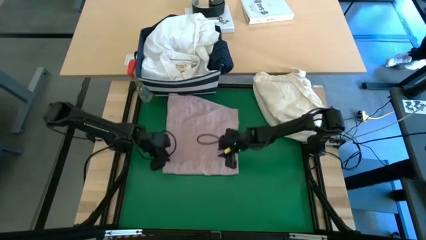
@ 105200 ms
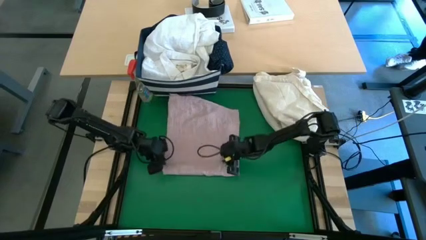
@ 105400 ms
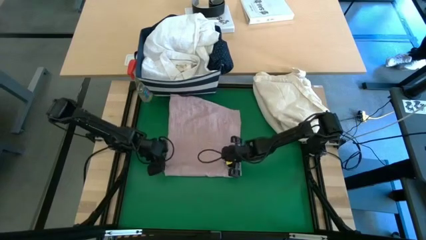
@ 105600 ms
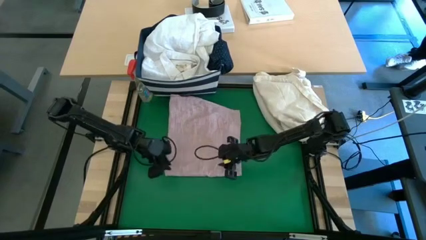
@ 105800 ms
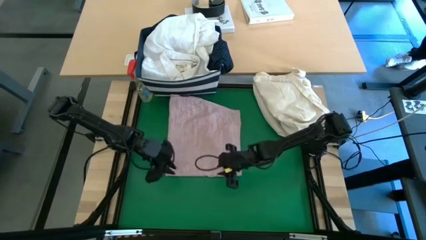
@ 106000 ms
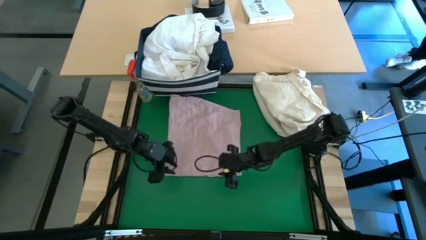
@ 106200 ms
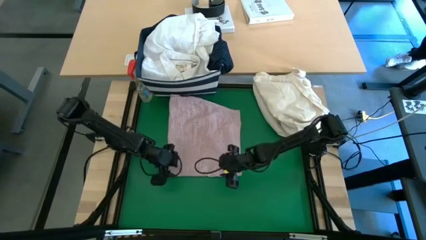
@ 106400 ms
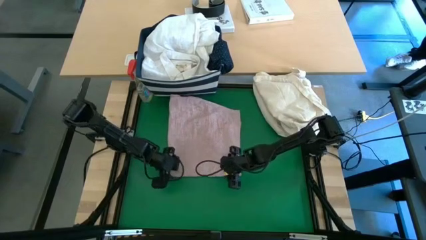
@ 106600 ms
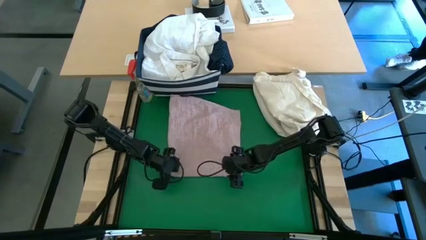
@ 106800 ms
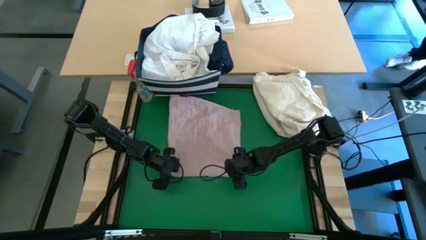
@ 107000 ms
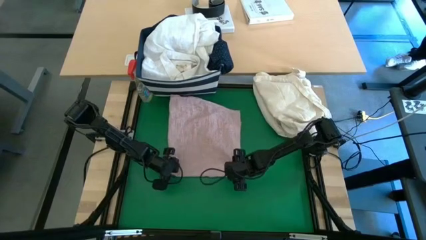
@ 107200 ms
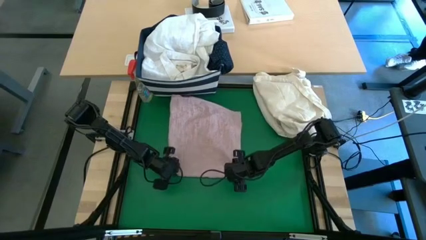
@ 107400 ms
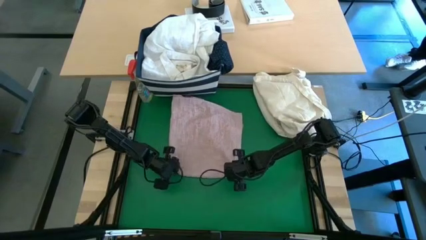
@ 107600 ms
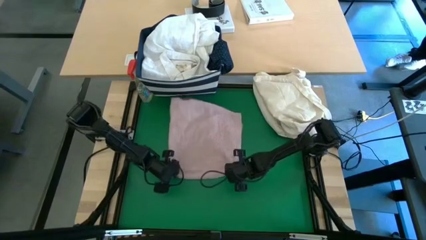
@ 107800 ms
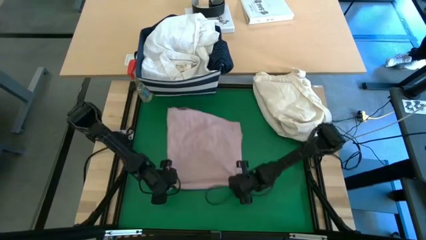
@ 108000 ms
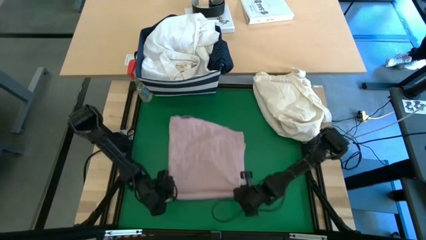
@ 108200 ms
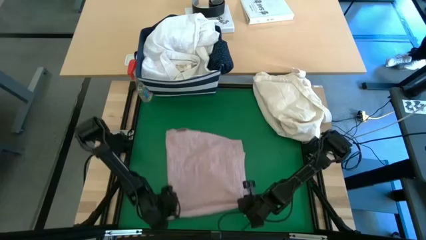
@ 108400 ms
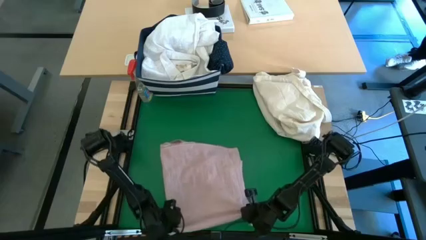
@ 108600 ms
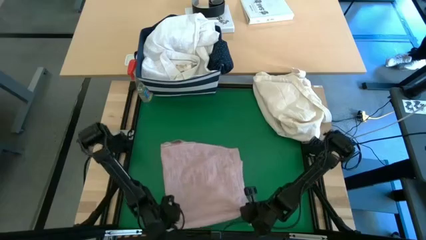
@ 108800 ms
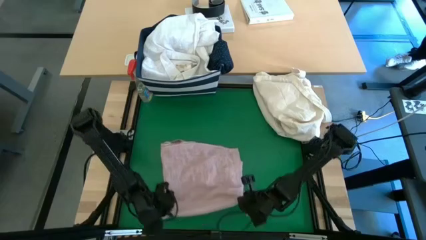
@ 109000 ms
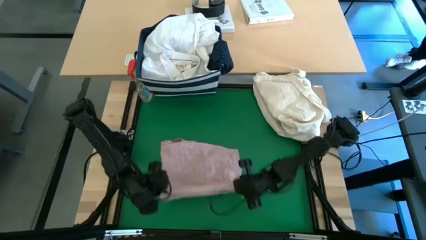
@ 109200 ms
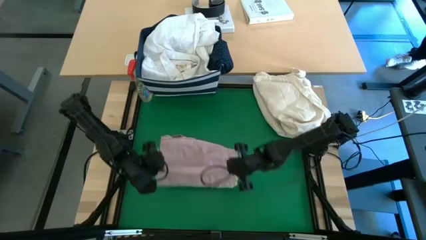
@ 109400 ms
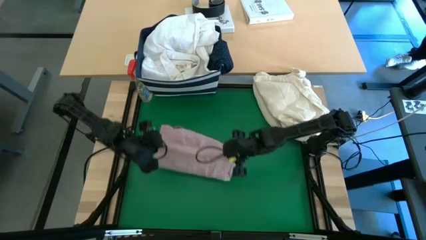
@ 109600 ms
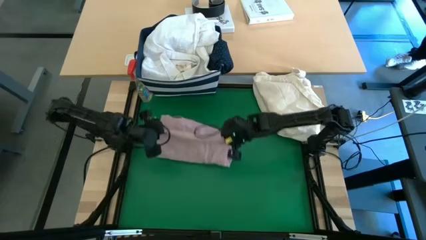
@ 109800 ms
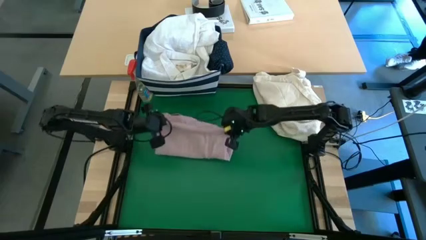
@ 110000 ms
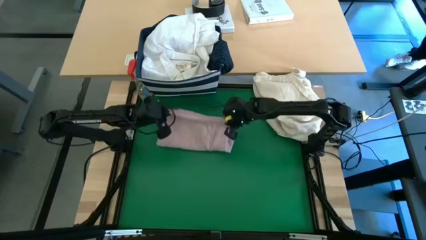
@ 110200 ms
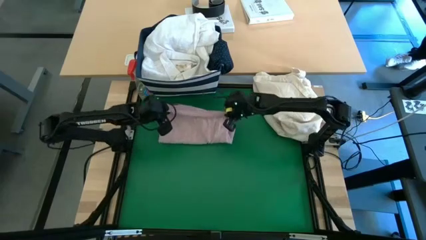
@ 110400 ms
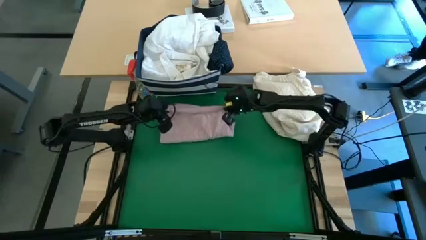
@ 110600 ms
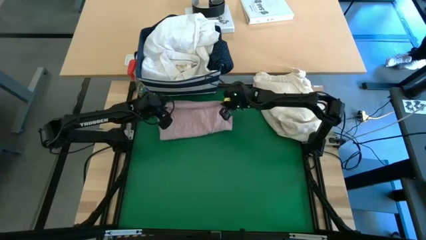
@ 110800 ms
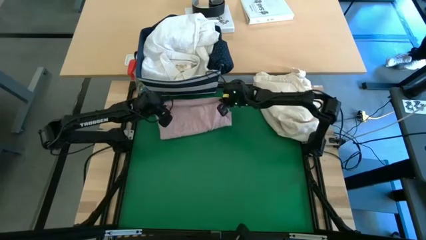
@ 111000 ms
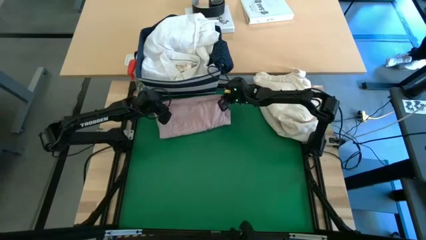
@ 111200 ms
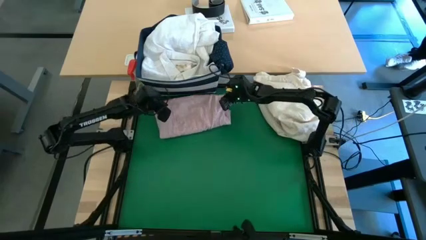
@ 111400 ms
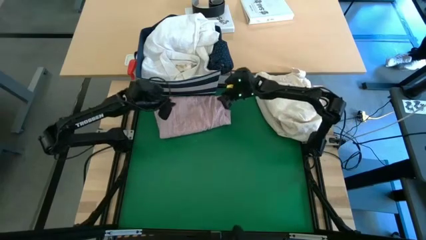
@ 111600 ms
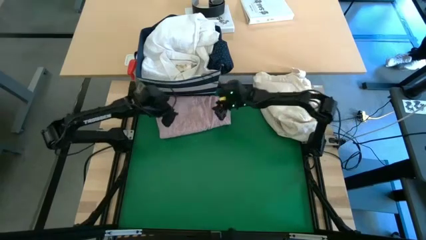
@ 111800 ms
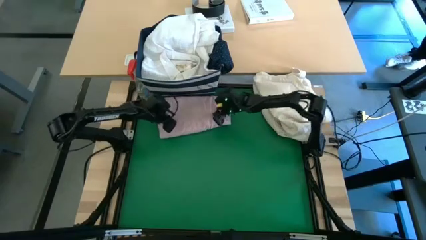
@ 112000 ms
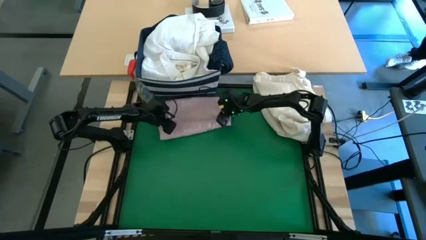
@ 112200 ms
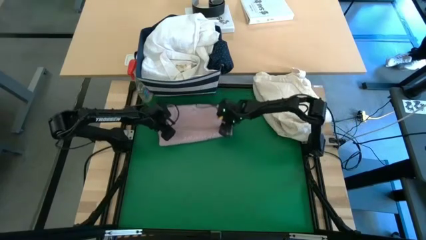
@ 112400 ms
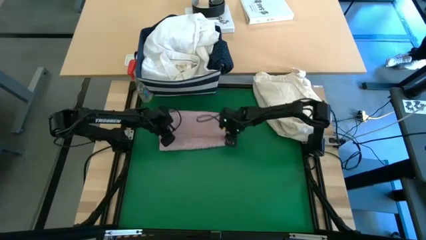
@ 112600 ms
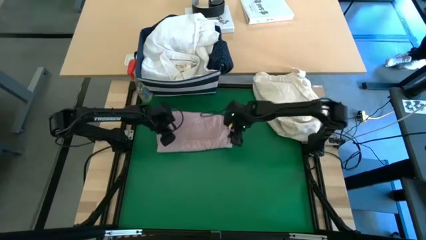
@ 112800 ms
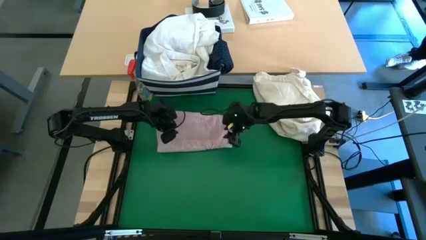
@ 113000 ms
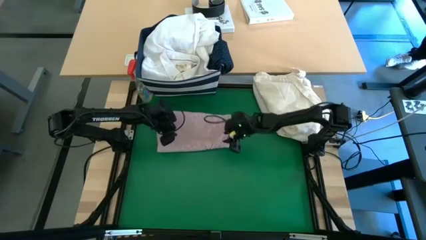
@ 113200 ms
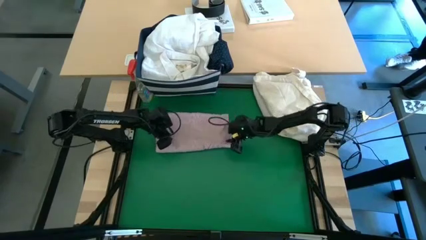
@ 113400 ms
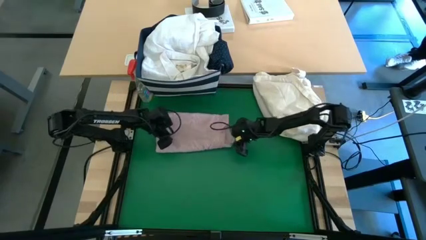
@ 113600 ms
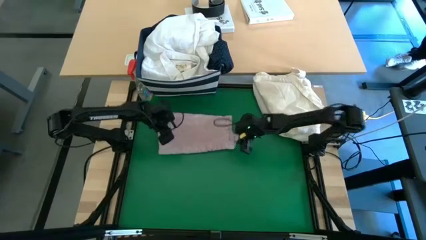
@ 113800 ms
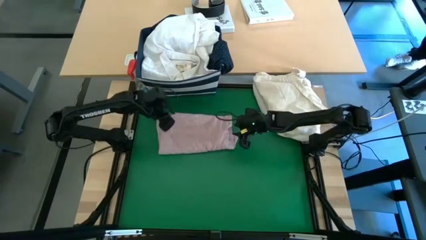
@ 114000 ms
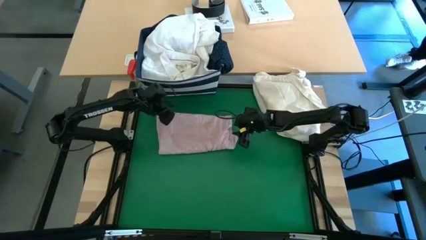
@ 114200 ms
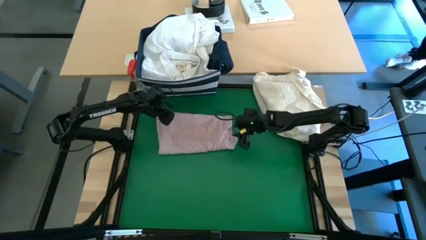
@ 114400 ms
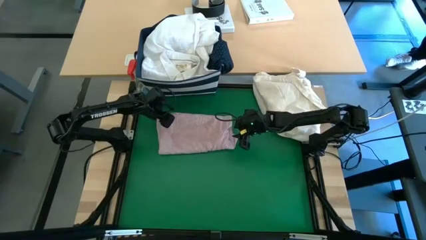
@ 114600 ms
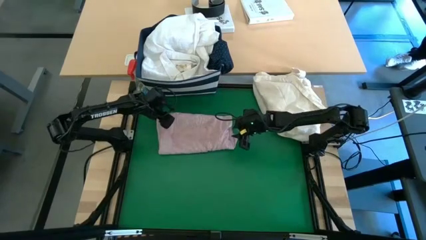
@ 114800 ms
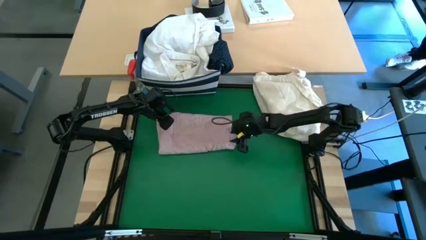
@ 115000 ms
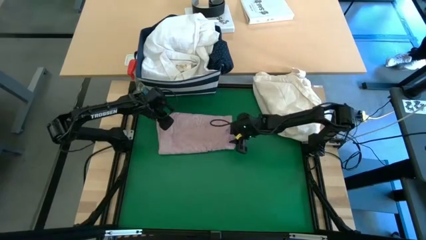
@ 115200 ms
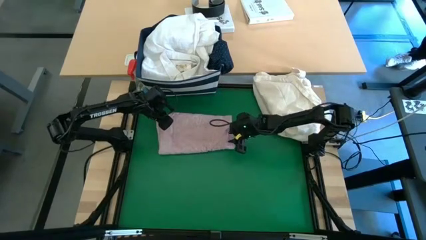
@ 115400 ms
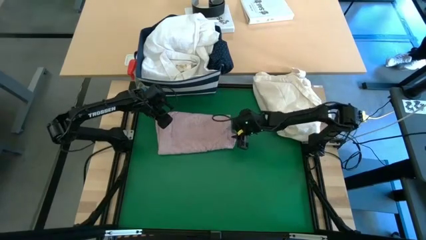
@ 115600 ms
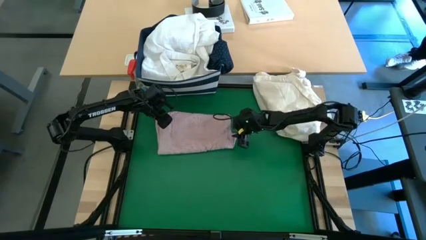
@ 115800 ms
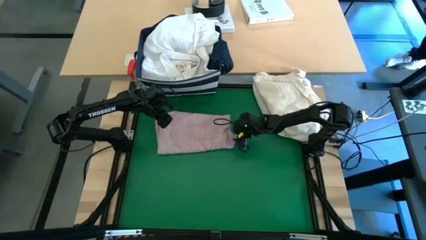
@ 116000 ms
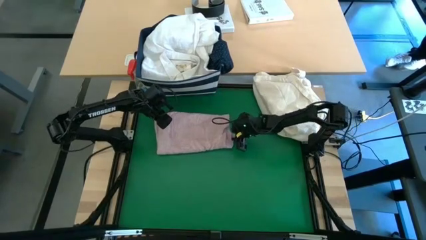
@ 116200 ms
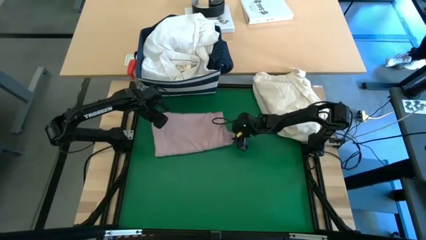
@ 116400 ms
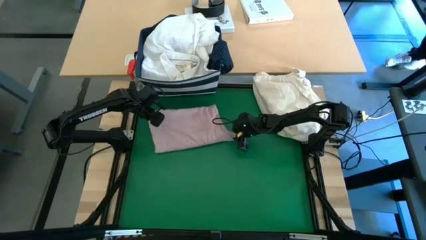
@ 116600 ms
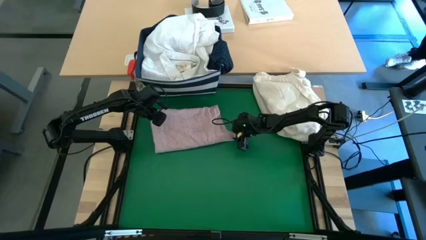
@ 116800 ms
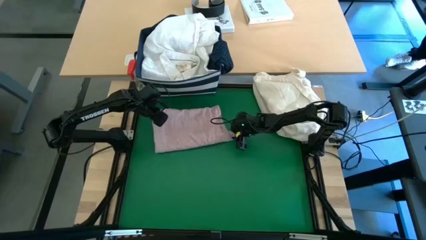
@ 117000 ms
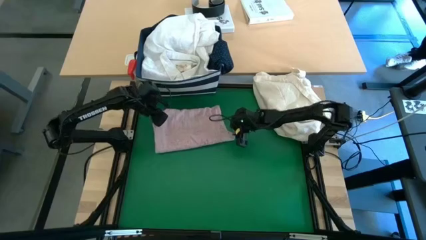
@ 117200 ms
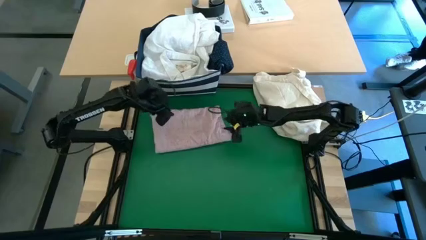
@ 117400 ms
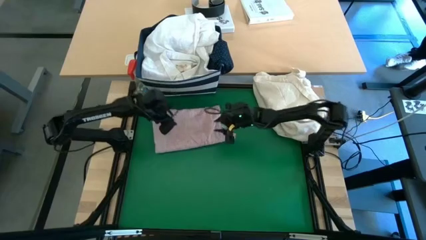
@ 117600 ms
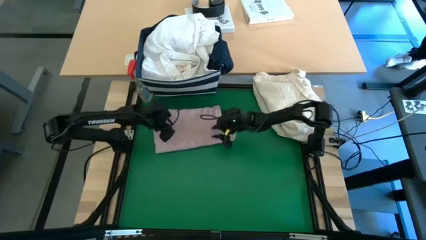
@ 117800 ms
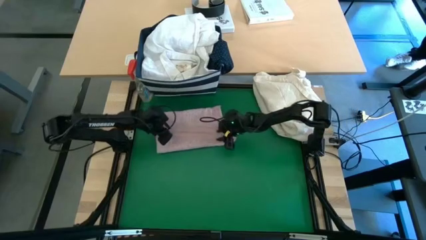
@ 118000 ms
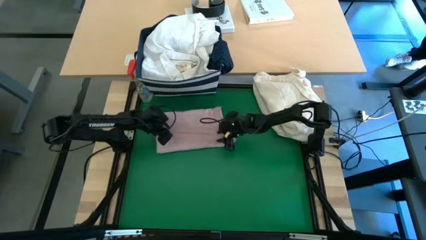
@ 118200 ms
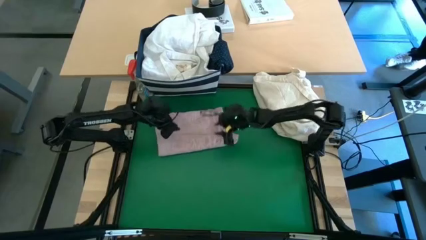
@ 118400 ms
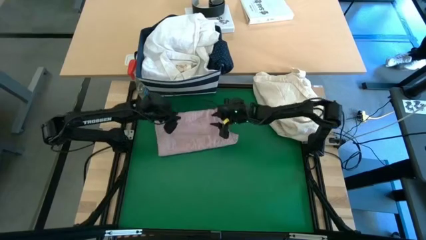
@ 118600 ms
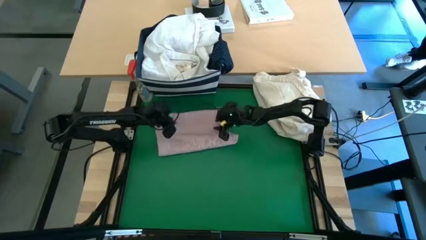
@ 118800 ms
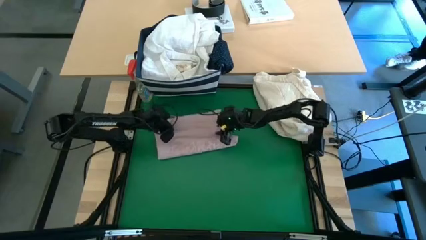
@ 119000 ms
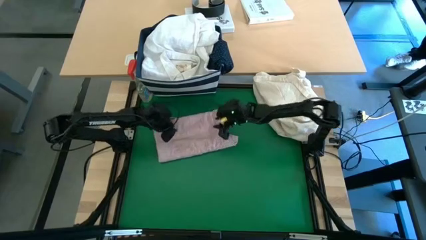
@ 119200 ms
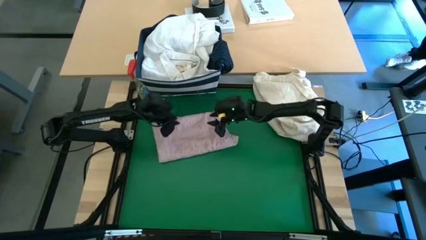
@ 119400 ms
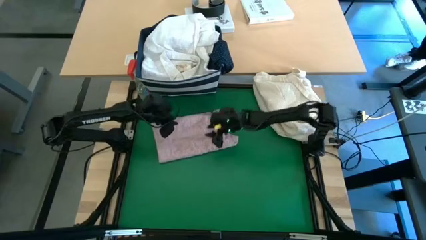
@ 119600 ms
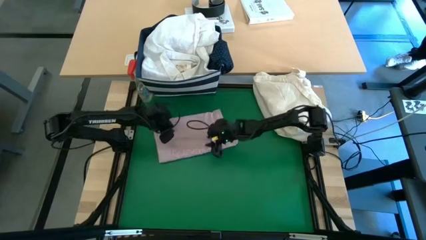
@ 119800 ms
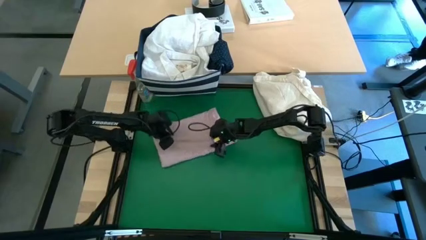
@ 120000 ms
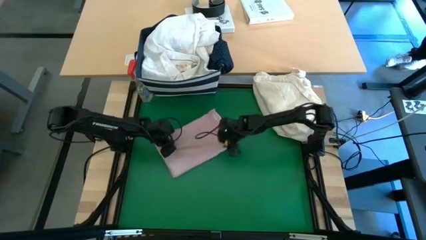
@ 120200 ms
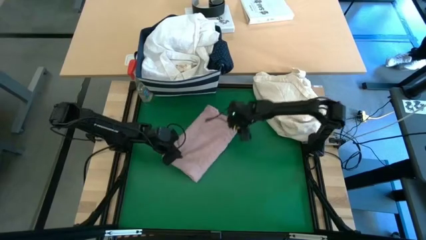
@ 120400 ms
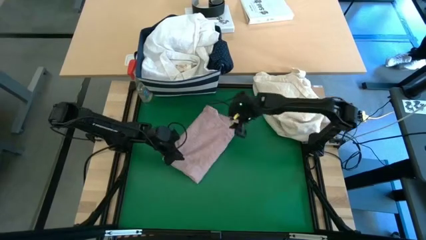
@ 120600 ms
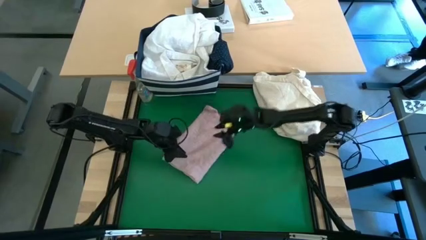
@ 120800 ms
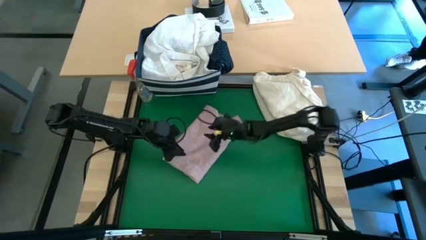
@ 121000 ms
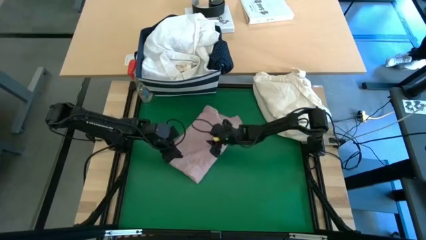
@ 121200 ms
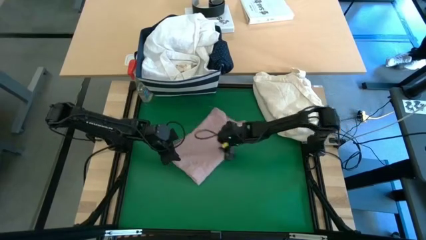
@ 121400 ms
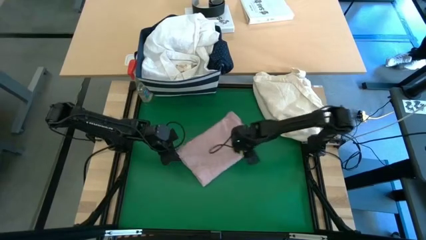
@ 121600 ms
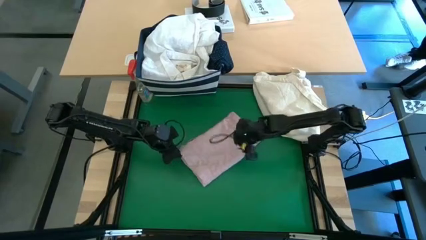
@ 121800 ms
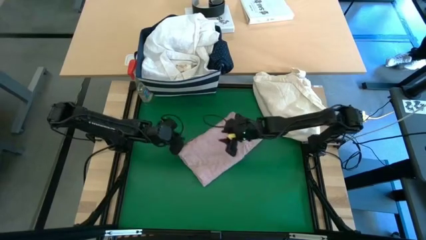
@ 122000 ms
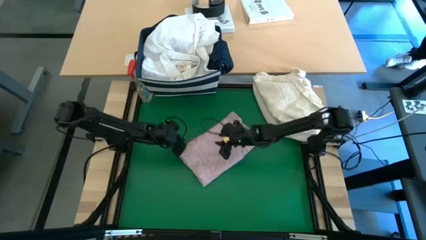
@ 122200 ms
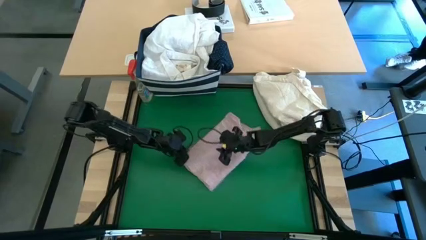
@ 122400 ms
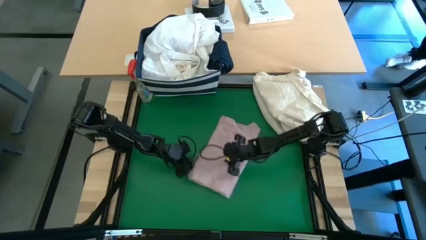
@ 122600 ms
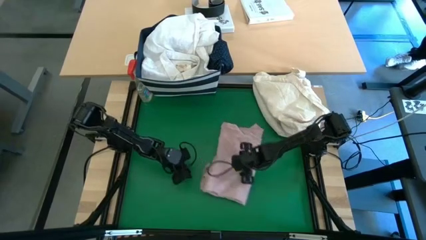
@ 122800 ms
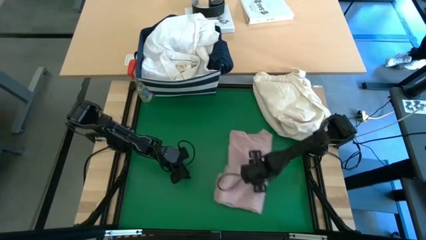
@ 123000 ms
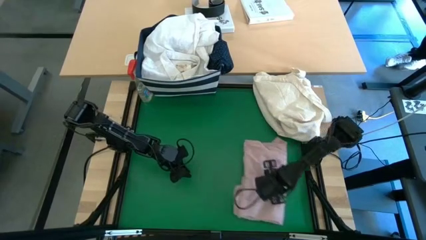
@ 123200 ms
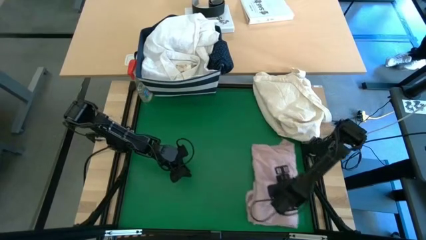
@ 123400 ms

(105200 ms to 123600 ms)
Task: Fold laundry
Fold the red polo
